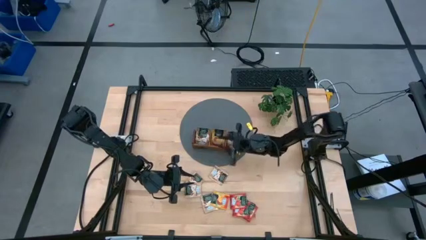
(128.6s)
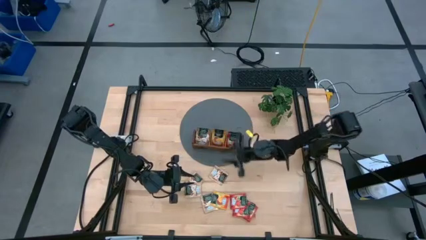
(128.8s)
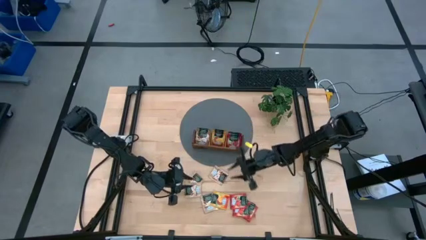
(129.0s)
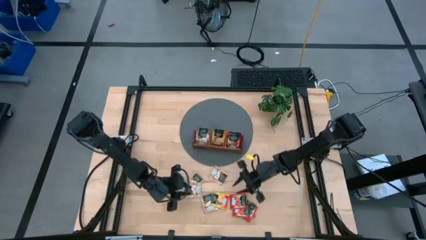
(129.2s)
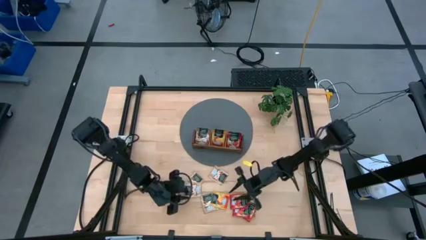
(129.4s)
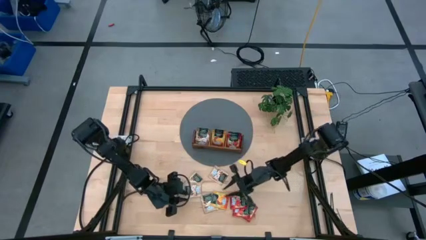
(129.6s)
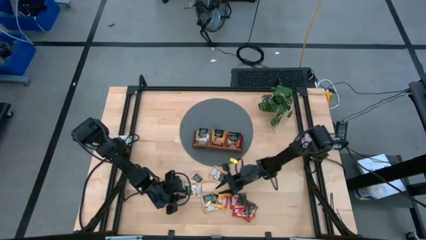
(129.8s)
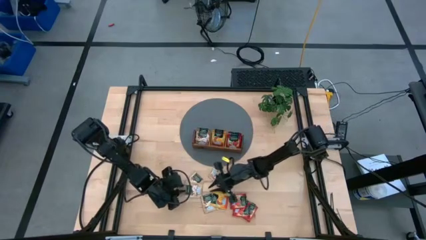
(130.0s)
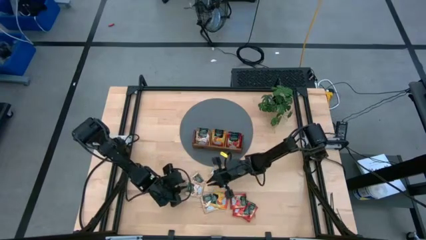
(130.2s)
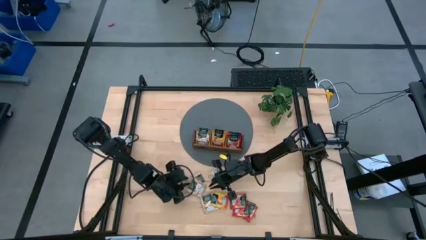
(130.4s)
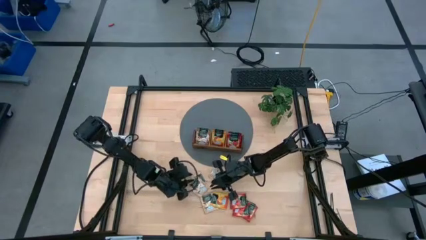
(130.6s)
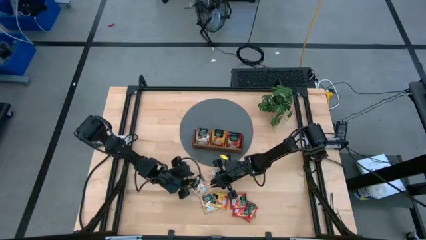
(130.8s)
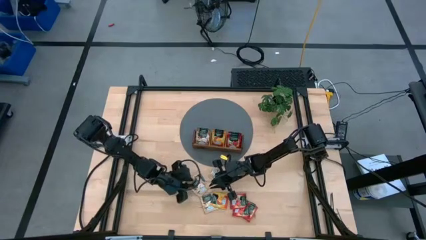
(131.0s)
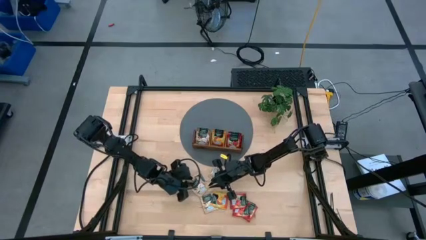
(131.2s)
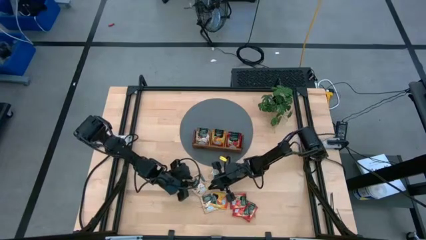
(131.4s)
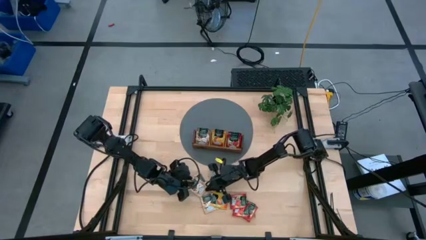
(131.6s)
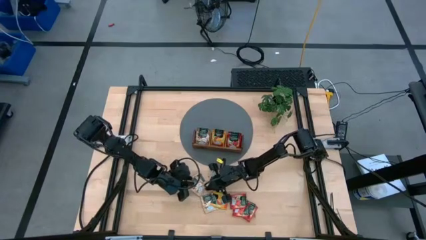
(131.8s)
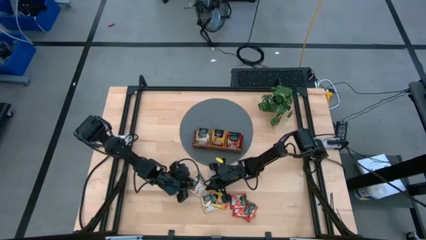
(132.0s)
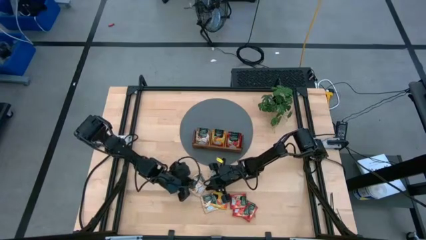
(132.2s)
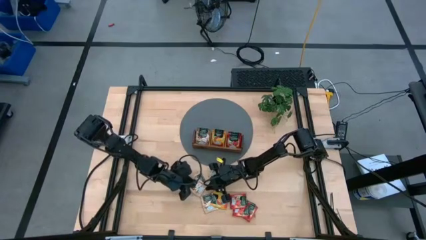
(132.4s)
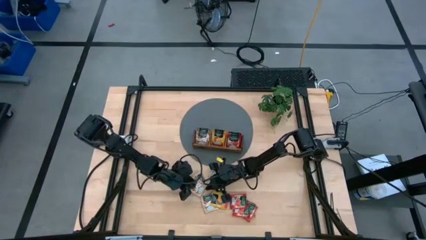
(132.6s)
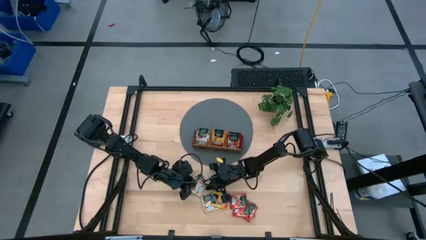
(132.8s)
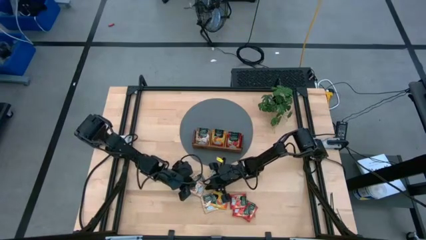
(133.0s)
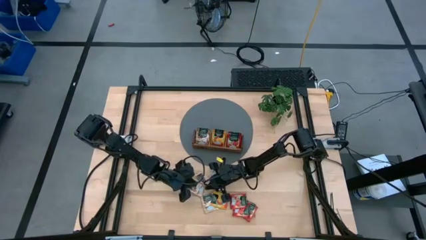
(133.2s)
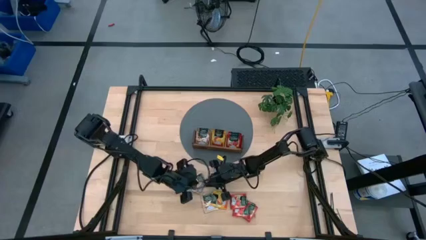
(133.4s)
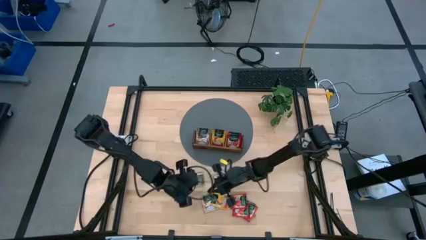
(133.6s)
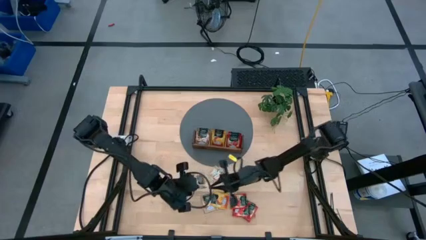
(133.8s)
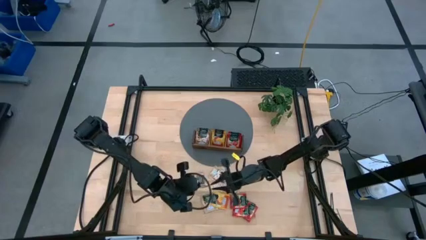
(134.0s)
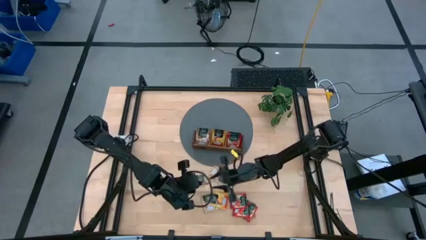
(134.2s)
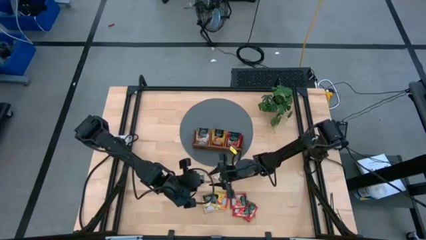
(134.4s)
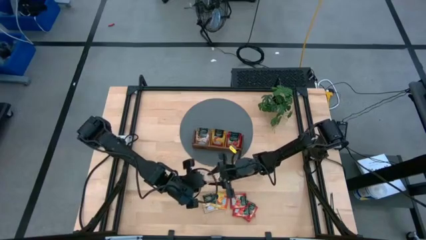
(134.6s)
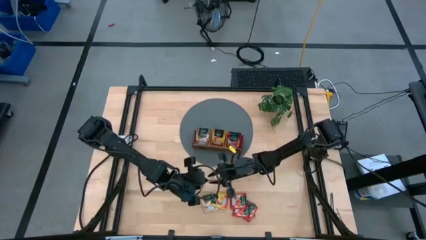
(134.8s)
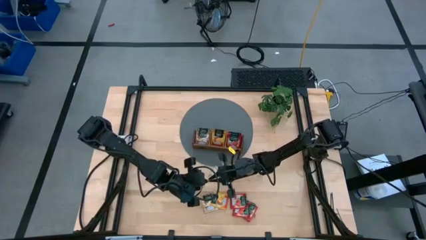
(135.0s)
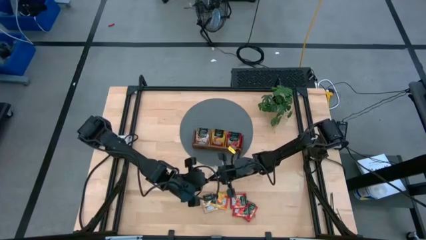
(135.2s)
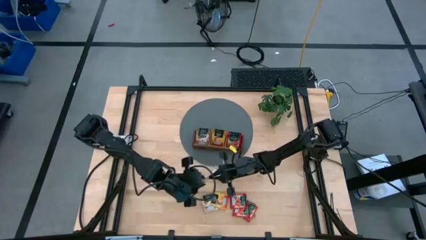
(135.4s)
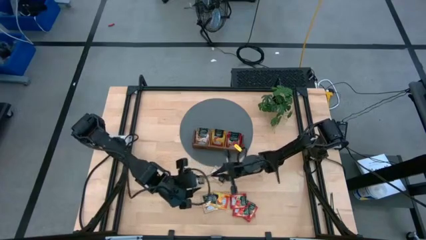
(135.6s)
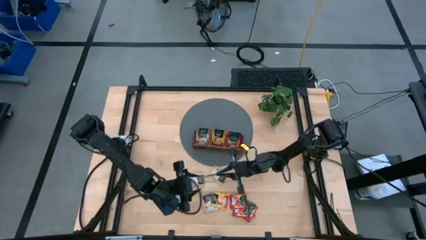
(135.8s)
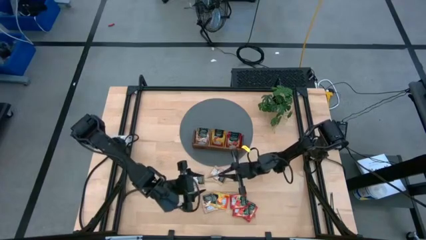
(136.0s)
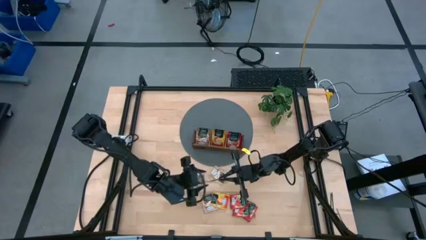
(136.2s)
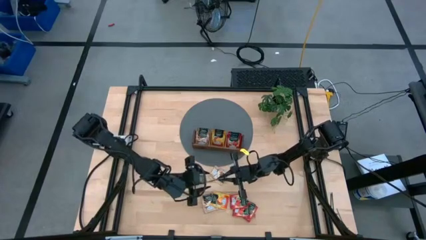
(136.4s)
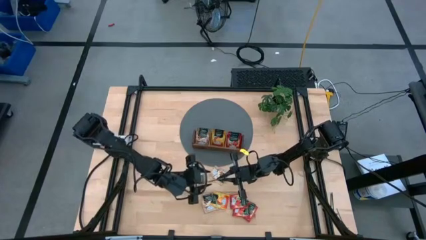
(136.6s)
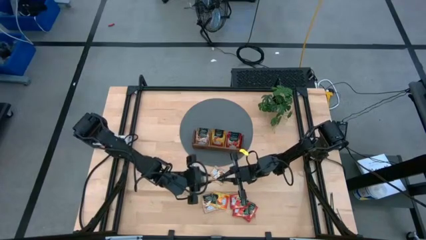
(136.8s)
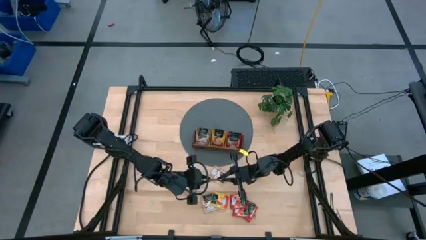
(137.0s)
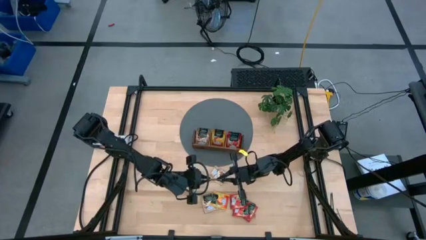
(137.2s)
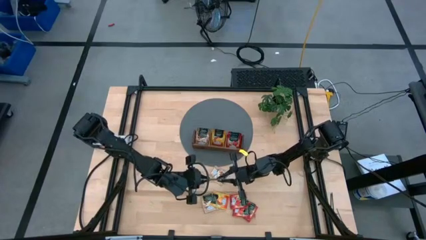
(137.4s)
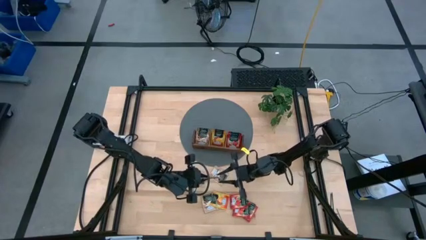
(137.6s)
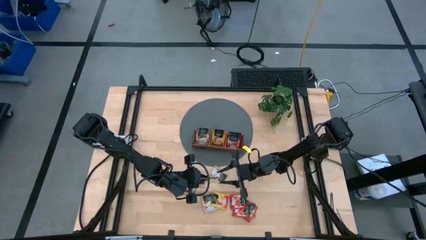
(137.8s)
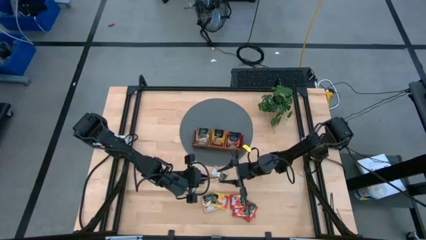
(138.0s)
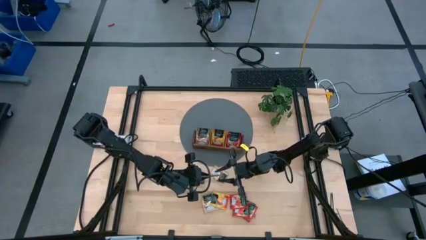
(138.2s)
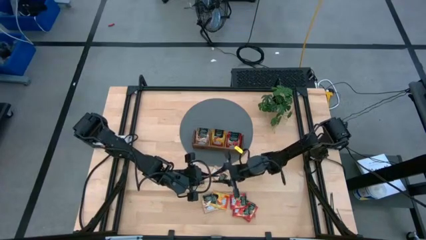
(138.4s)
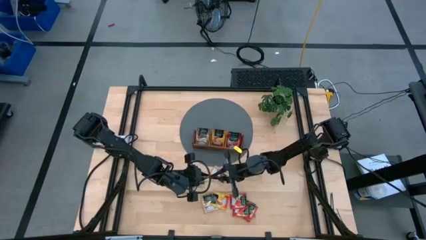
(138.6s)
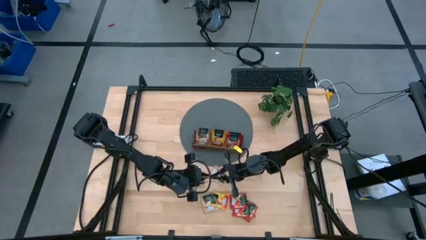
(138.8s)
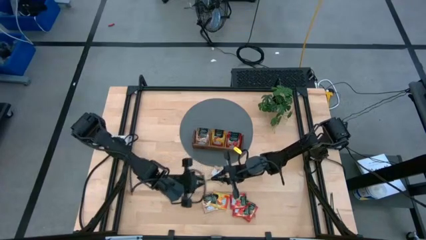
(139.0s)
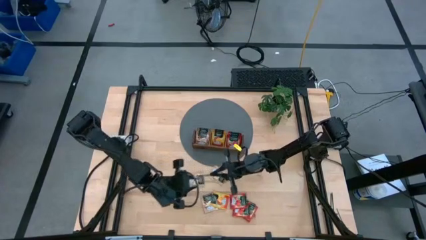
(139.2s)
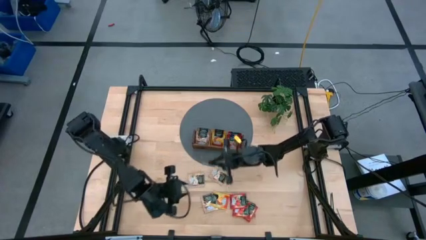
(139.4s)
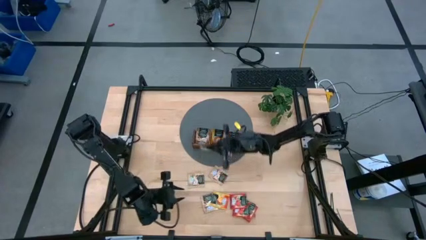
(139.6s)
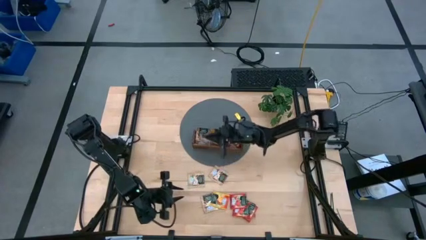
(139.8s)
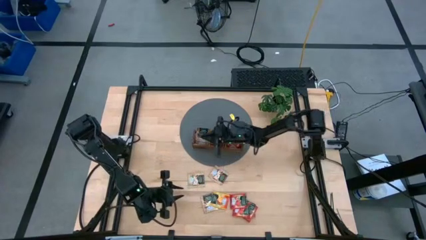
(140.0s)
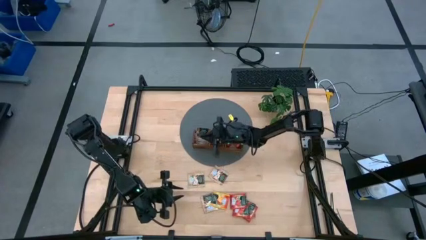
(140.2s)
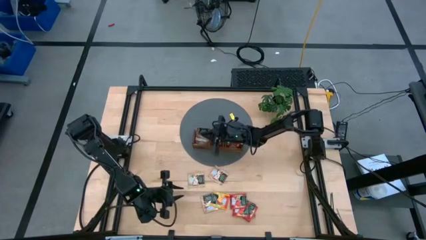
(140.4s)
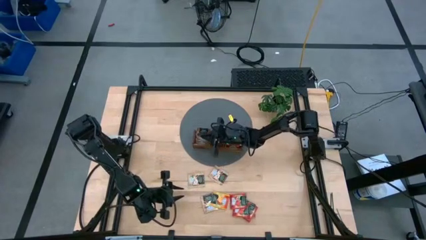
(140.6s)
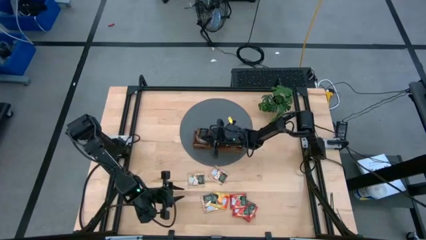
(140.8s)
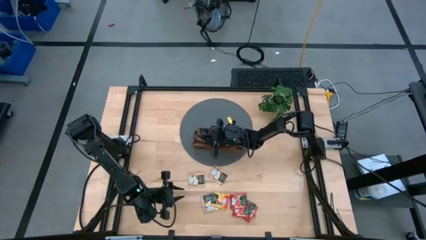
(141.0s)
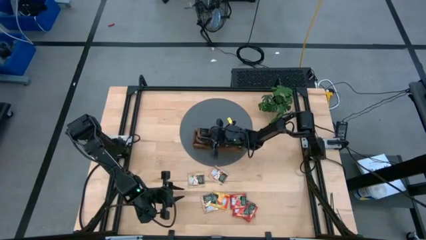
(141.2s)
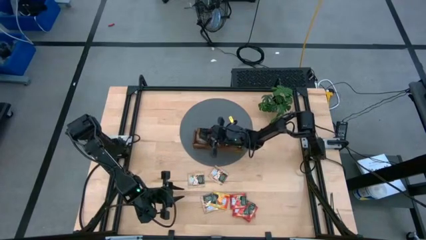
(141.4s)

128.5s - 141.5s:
Task: Pick & Place Tea
Put the brown tea bag into the left section of the wooden organizer

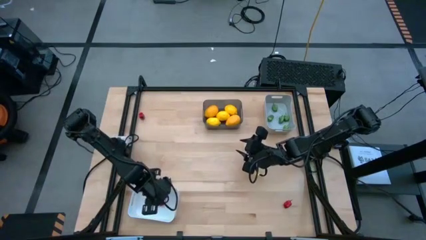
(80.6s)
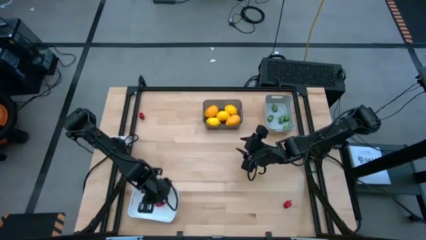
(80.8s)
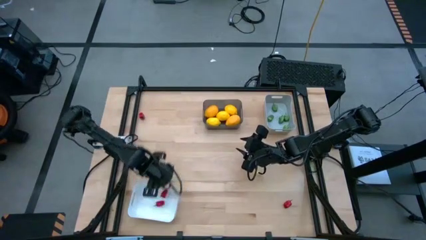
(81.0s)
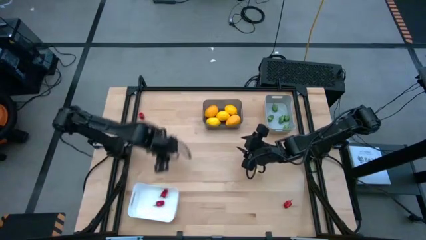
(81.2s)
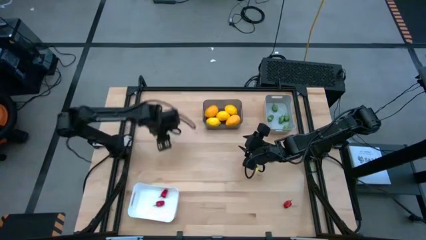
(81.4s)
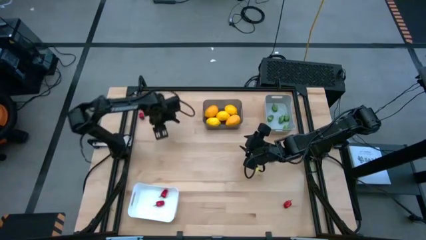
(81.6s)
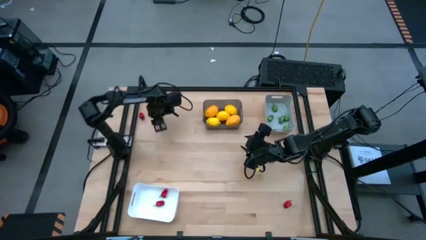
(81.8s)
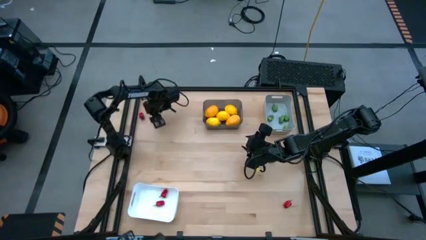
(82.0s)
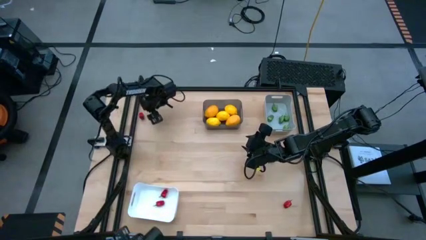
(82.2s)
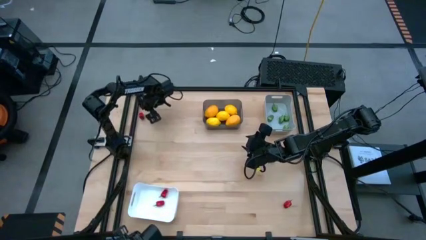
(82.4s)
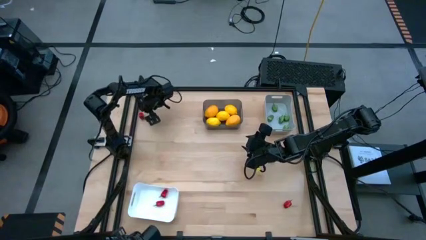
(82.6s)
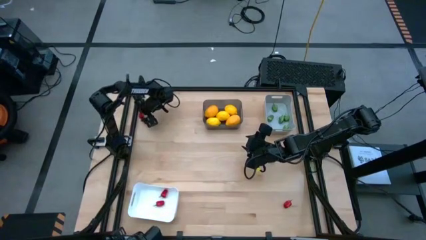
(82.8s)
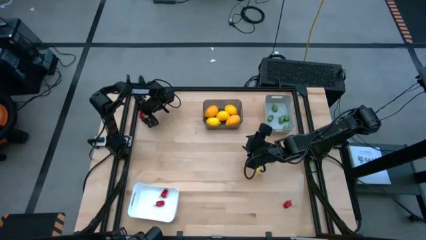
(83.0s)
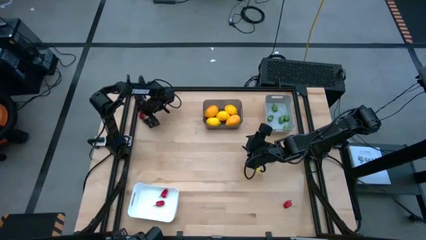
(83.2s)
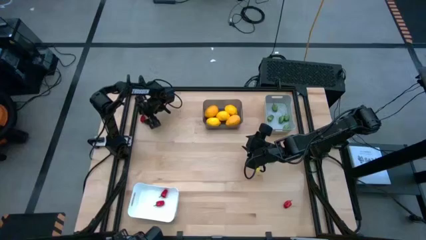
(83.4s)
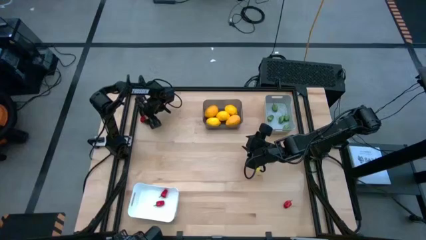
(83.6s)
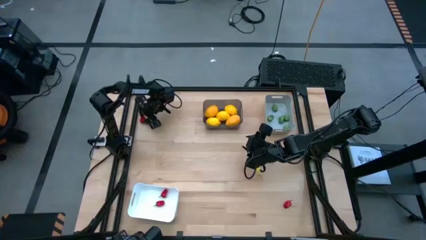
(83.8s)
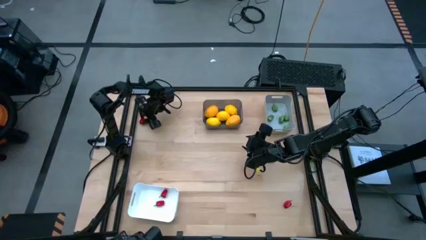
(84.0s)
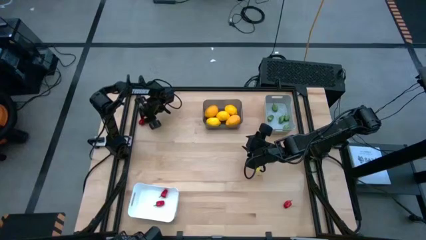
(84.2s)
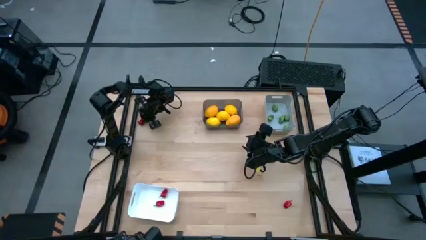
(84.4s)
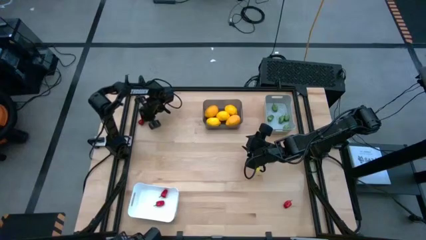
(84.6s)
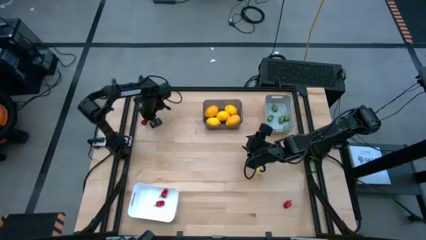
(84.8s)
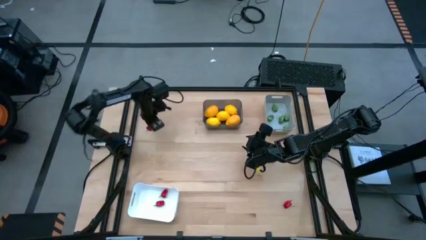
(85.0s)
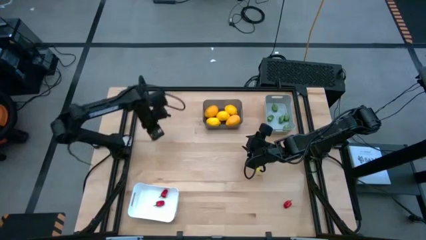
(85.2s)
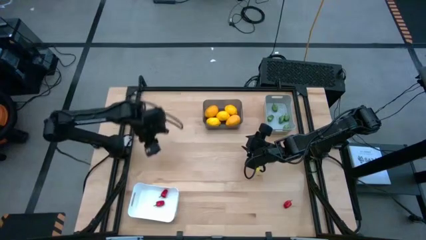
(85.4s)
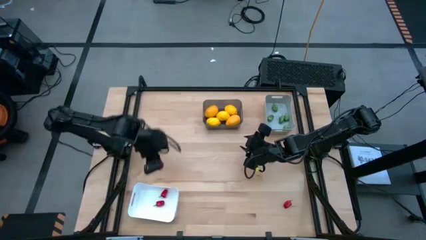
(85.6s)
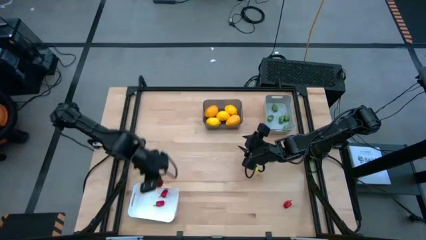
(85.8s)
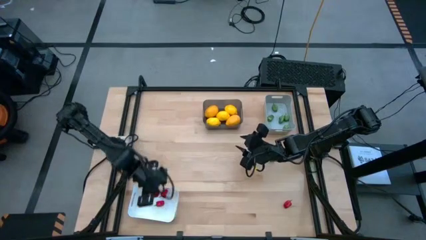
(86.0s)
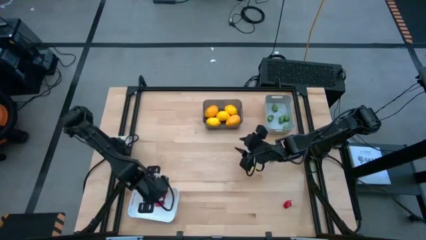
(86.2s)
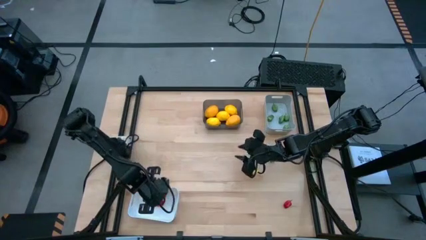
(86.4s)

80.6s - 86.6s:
Task: Sort produce into baskets
Put the red pepper into the white bin
